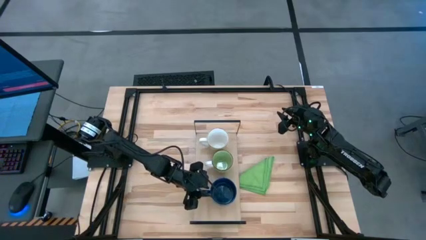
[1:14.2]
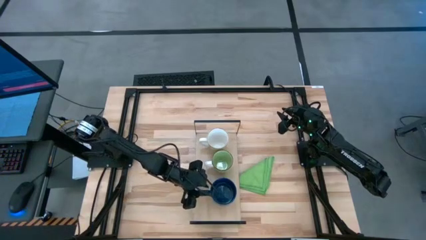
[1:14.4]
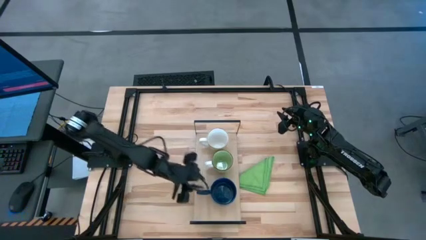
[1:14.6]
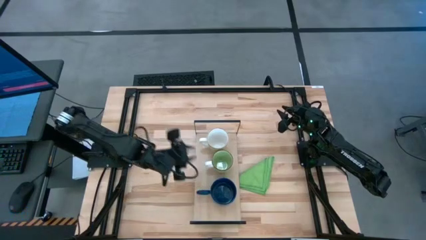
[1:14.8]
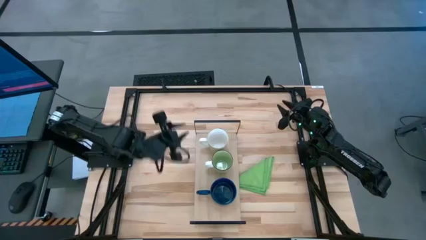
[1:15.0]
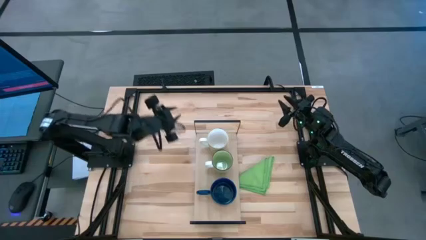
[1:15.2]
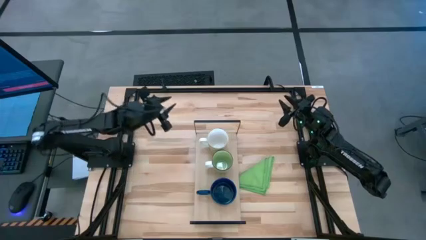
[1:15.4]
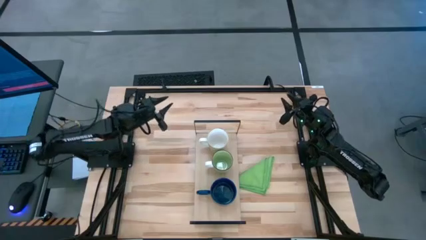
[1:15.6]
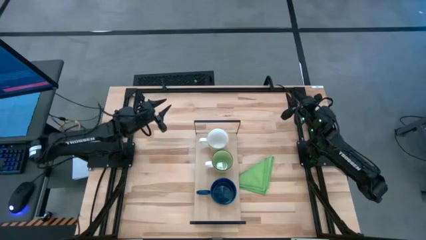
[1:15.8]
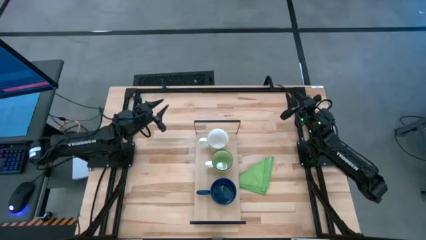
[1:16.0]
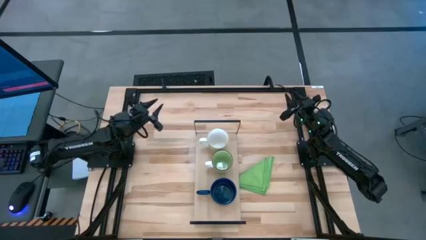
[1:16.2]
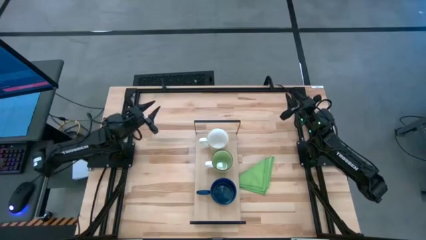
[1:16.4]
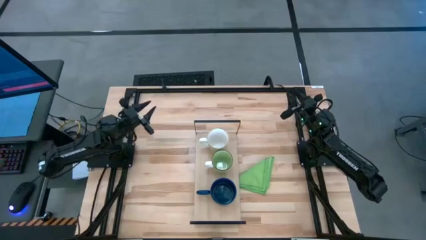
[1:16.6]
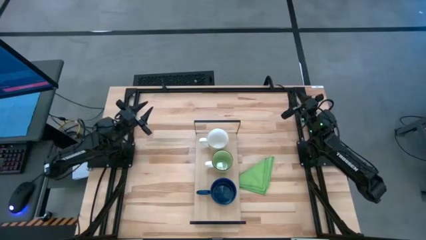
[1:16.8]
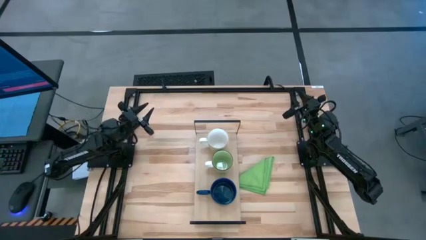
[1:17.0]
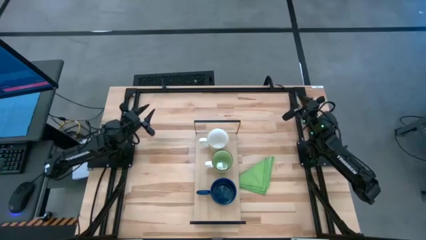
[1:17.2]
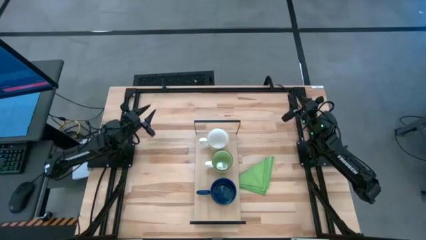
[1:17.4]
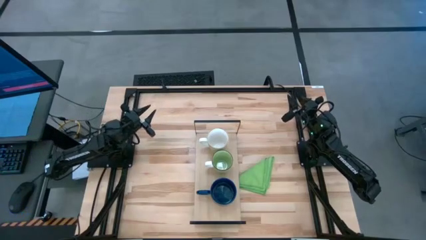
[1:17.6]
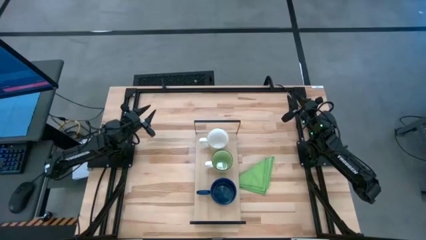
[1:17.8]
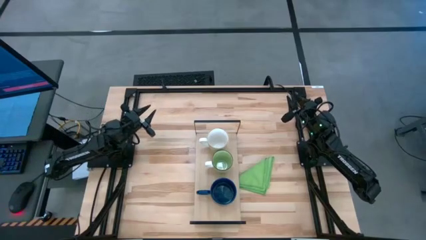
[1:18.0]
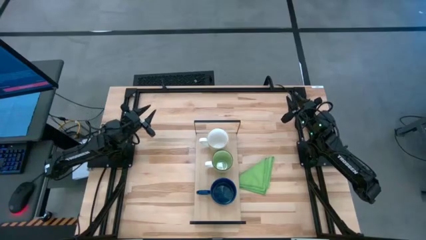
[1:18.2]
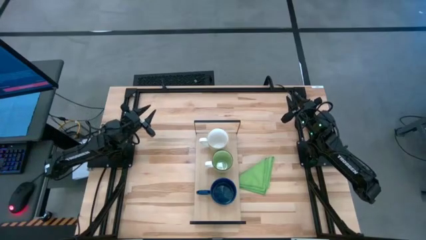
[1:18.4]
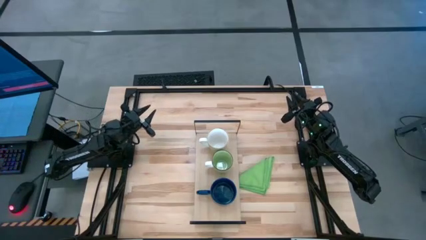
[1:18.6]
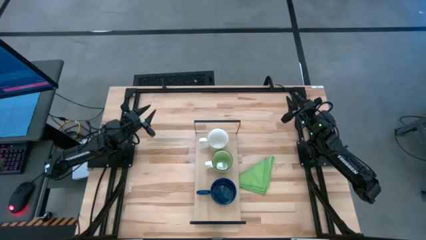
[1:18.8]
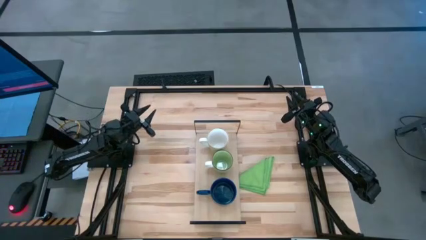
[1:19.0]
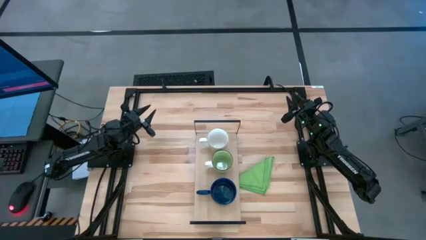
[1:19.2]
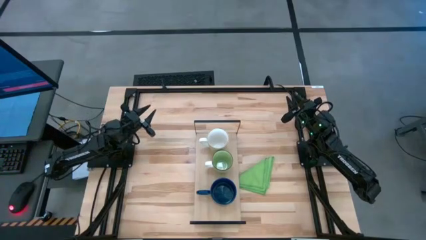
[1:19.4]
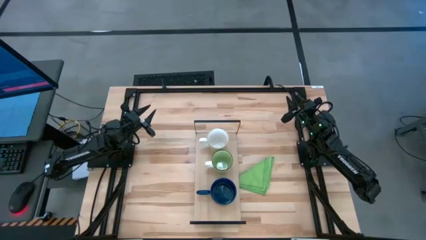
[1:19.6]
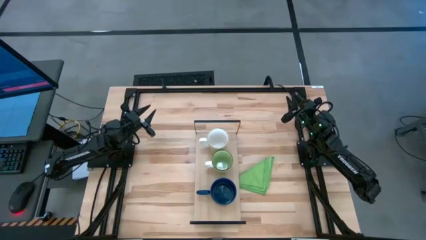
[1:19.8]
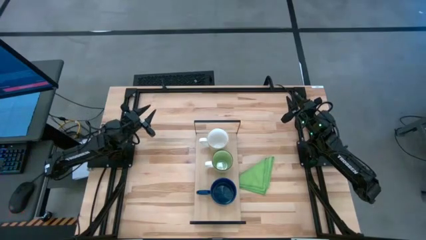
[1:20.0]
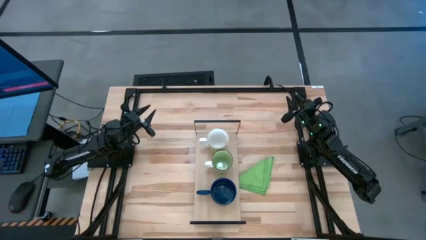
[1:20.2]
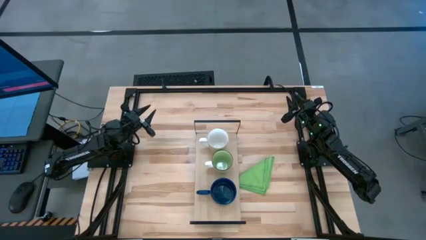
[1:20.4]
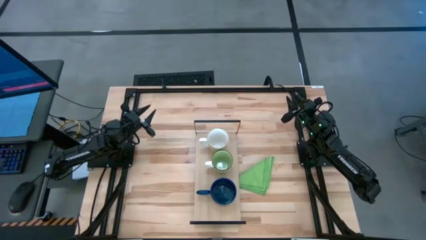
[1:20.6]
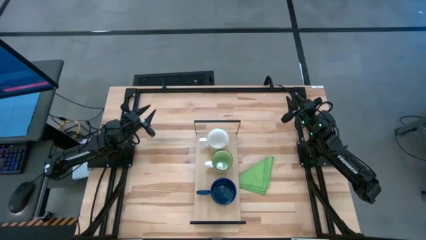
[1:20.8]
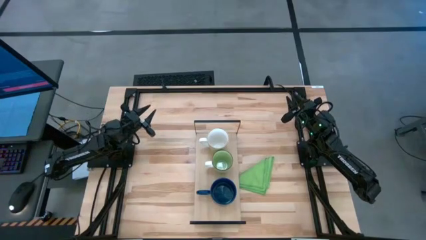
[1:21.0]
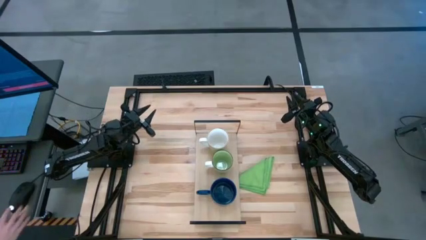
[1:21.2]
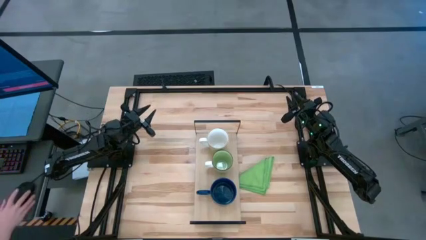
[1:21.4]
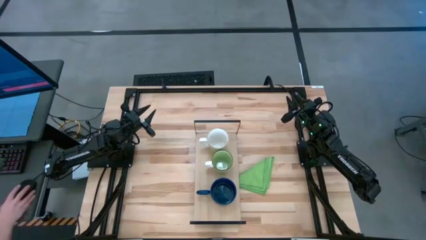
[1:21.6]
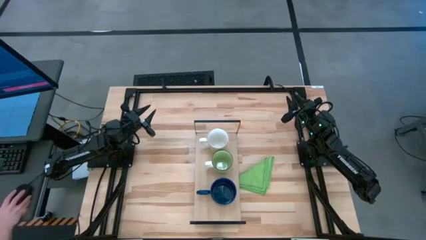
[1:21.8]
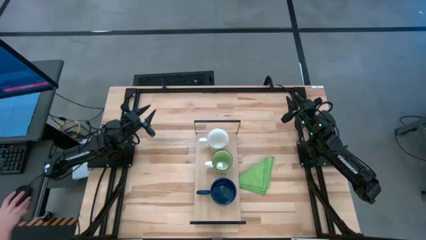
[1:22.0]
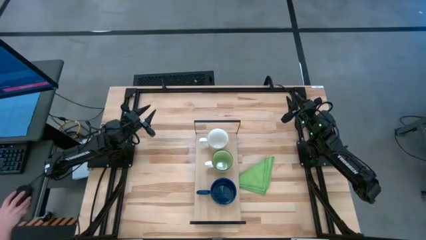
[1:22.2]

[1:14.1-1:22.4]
Task: Stack small to large cups/mugs on shelf
Return to Home Position

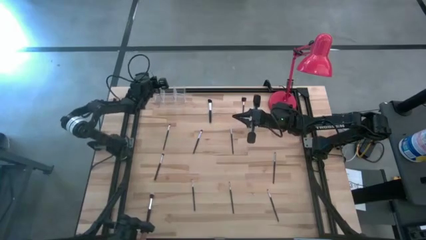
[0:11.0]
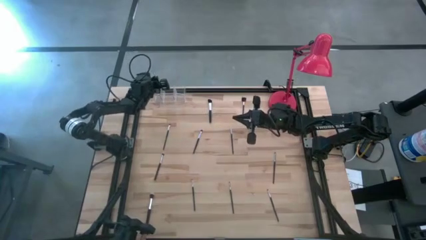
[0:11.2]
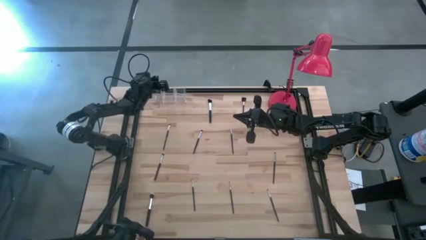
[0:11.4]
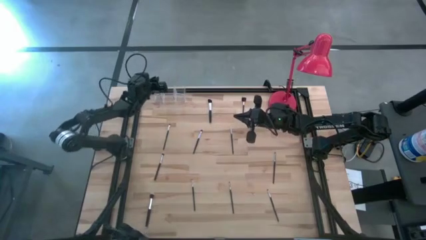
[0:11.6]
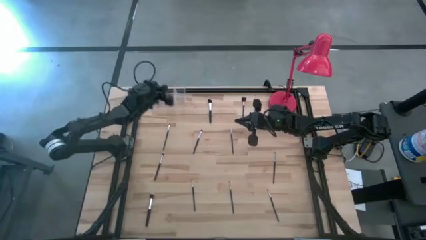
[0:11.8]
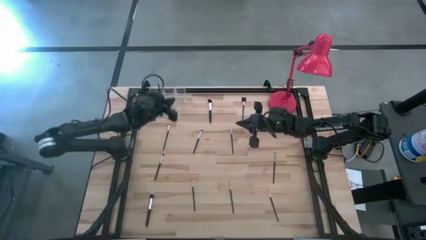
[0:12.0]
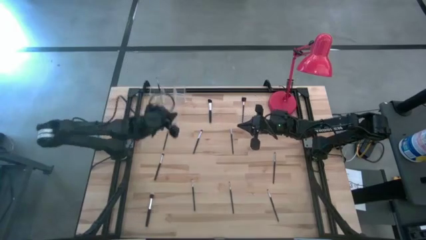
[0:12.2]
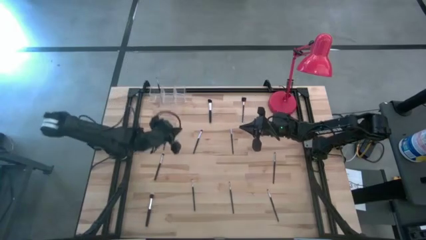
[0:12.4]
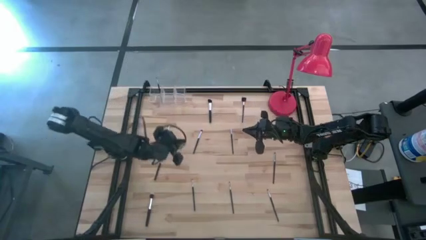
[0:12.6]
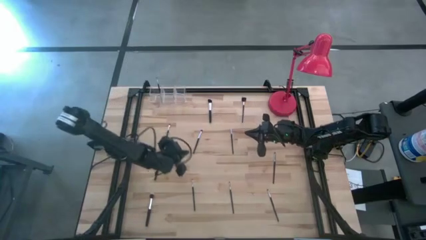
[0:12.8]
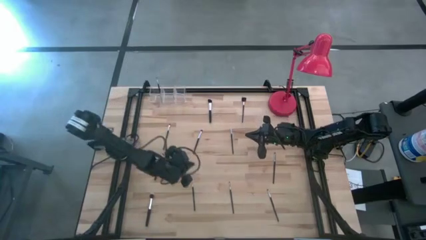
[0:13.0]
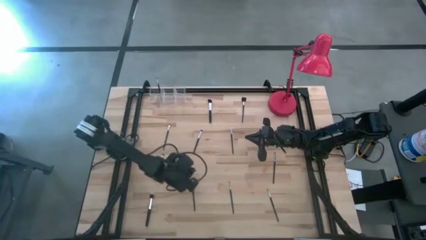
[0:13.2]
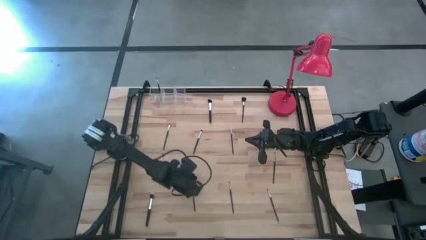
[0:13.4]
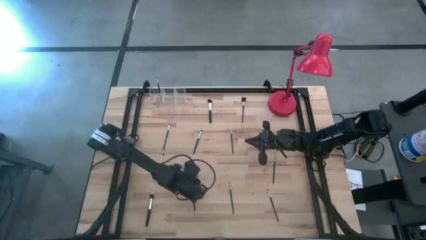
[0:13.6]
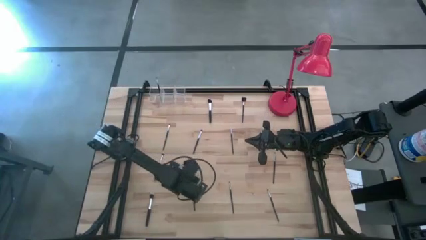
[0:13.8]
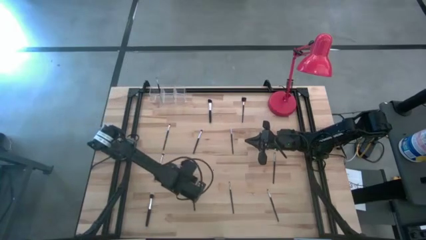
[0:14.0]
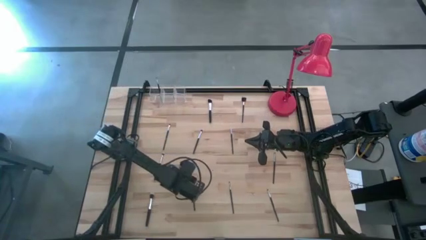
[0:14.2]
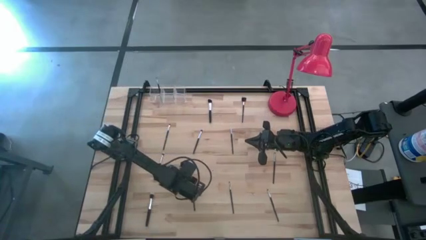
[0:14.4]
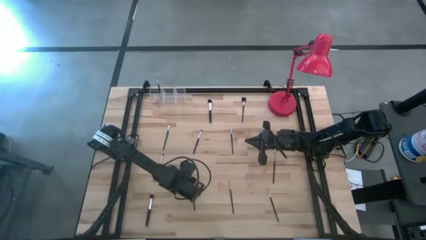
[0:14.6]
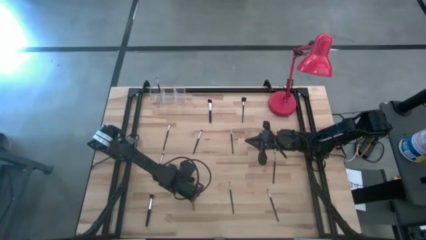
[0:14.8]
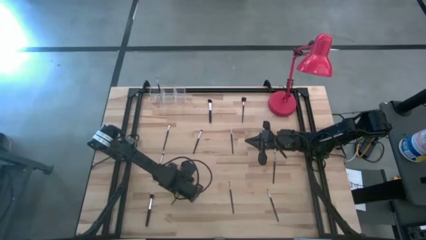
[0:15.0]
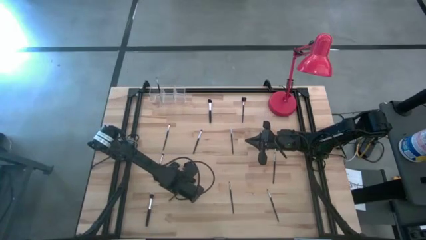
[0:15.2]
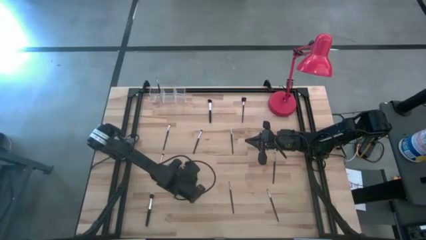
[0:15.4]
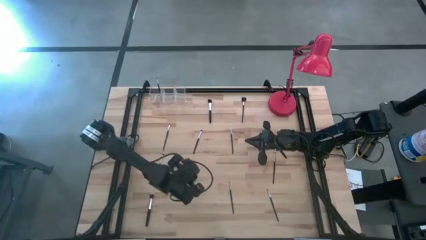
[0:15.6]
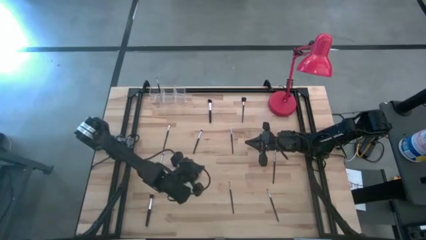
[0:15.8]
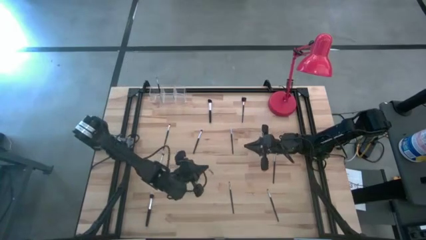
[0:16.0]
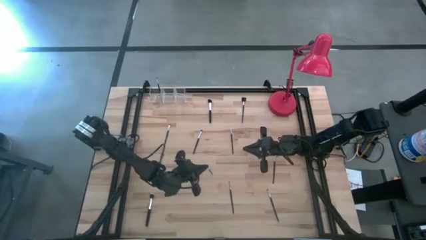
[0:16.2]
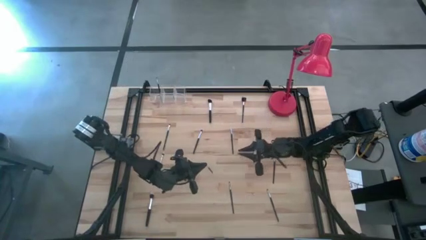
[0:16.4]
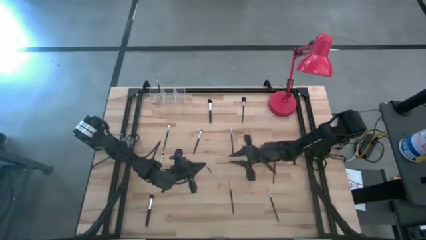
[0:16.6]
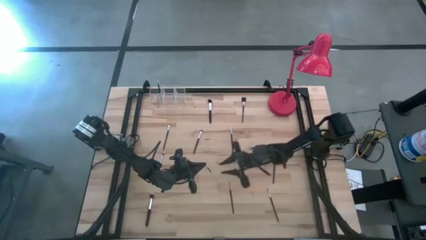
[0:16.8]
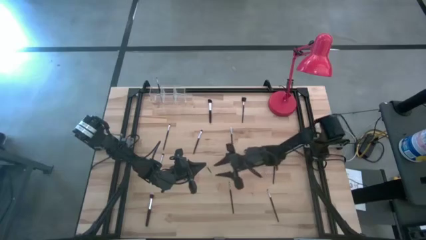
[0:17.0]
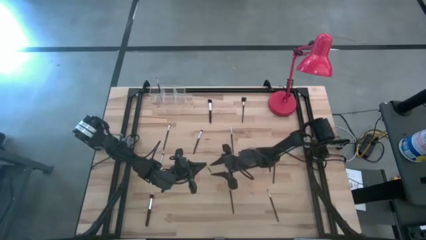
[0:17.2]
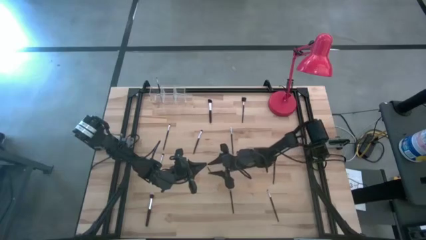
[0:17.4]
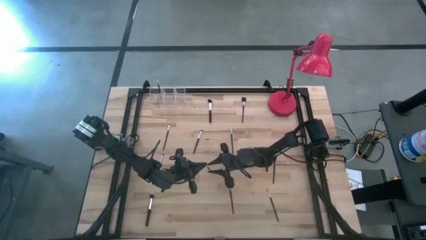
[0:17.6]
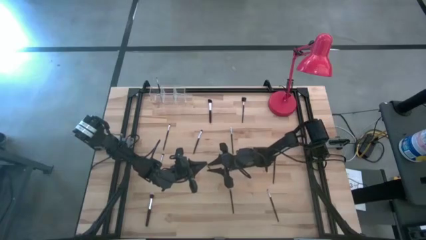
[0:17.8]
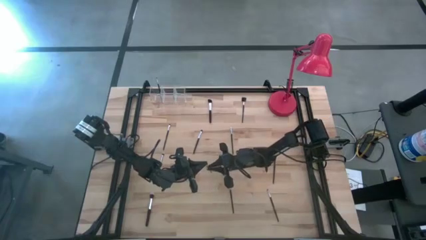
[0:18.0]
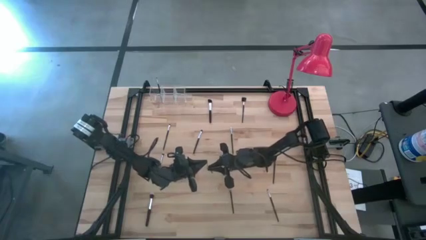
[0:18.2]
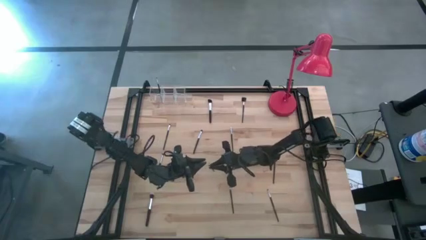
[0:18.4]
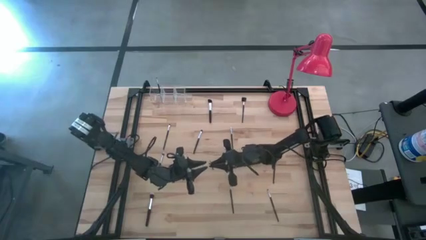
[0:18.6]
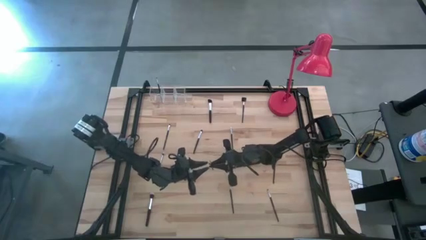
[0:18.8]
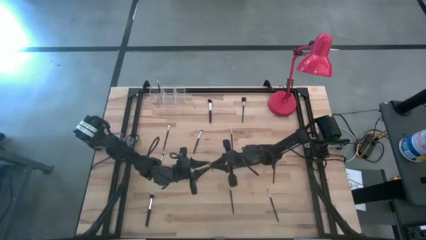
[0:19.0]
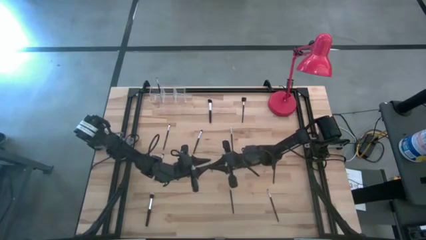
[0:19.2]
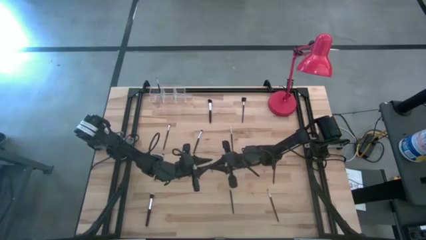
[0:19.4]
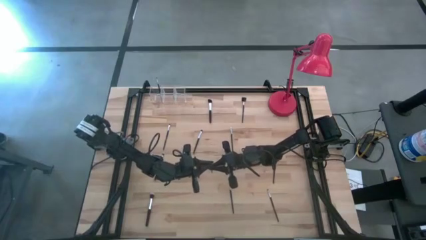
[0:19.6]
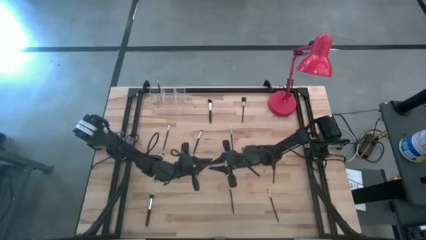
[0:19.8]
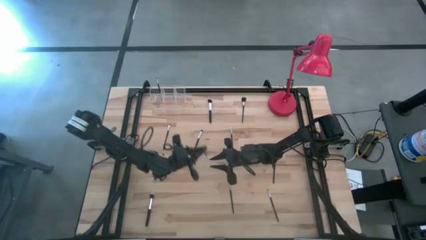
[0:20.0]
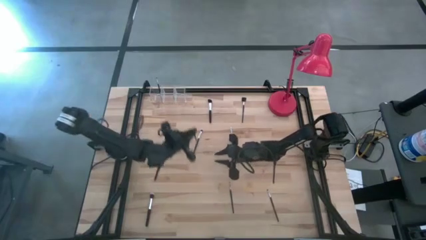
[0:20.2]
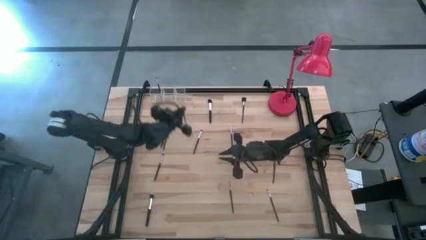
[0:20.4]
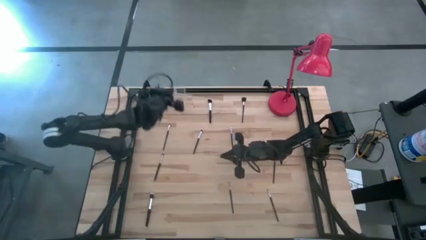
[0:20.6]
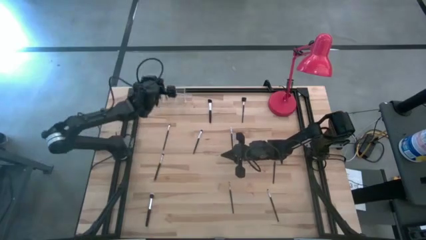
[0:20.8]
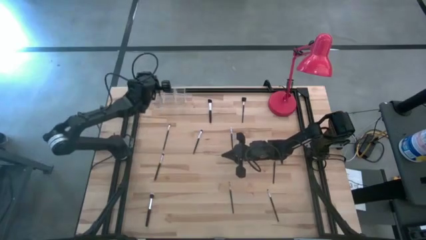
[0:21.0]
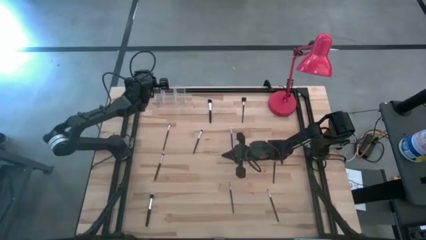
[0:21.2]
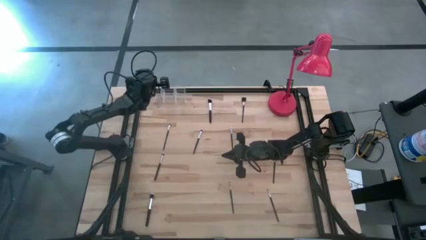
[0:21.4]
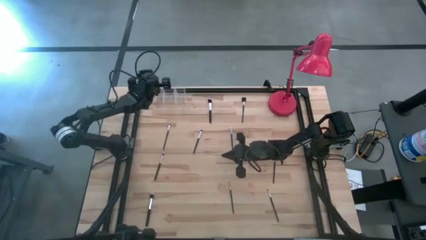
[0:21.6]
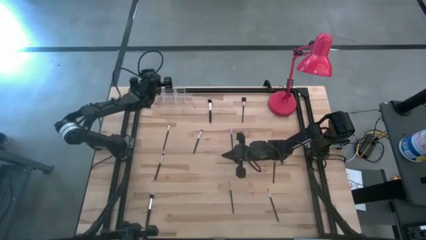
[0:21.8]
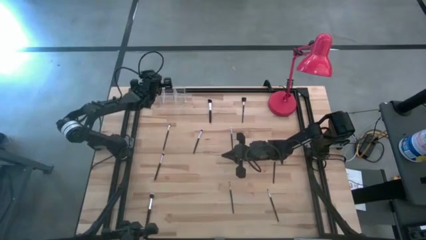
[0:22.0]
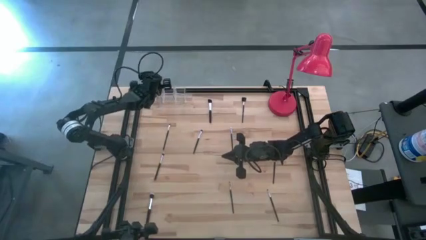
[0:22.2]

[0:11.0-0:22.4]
Task: Pick & Place Makeup Brushes
Put the eyeshadow brush into the transparent organizer
